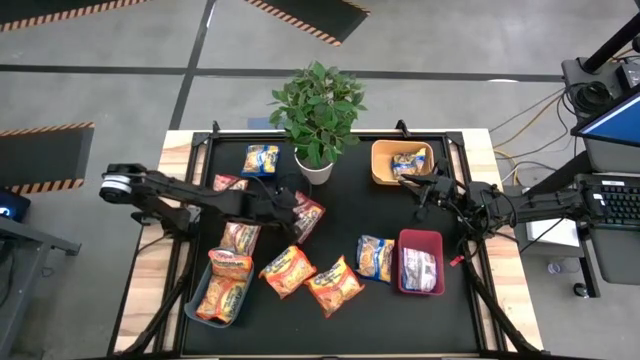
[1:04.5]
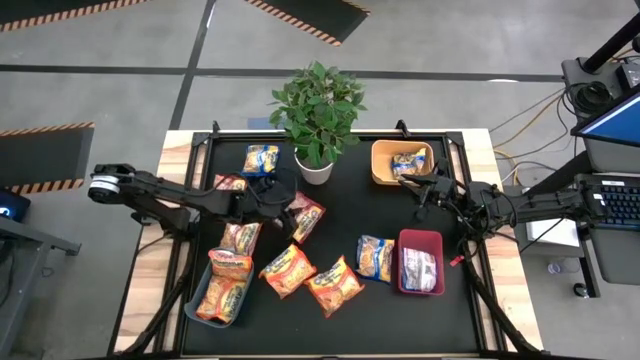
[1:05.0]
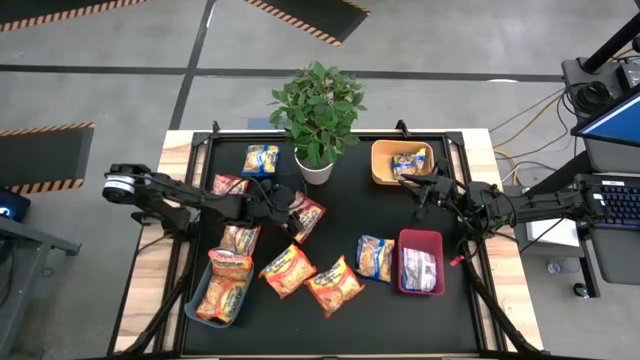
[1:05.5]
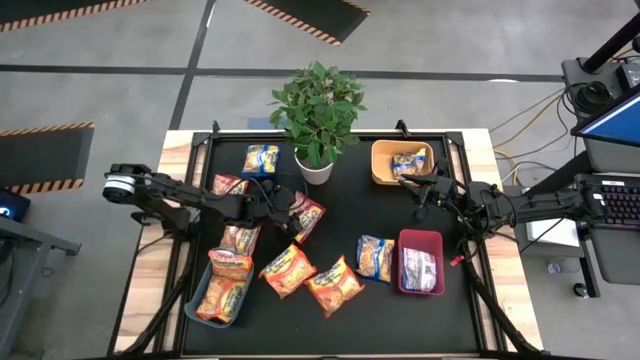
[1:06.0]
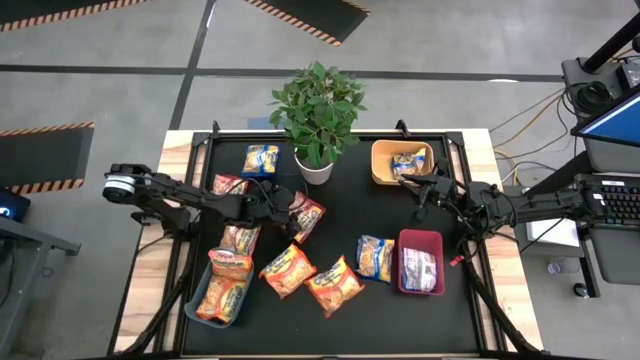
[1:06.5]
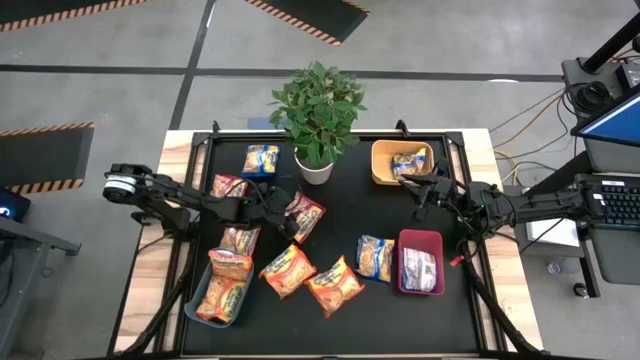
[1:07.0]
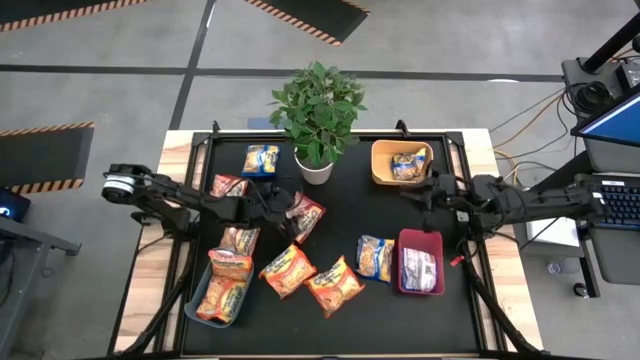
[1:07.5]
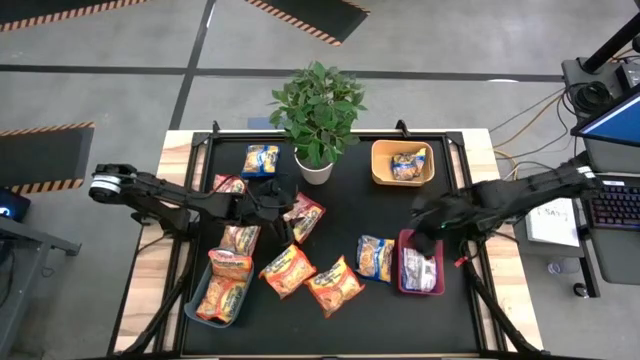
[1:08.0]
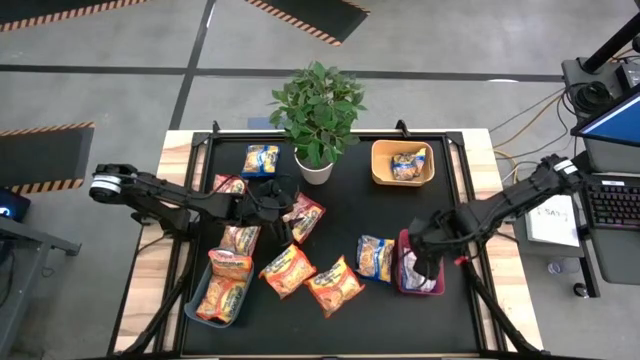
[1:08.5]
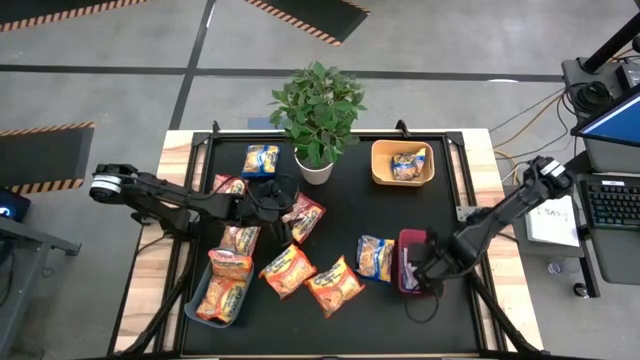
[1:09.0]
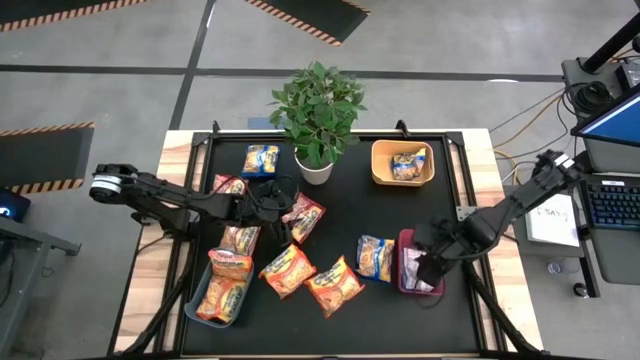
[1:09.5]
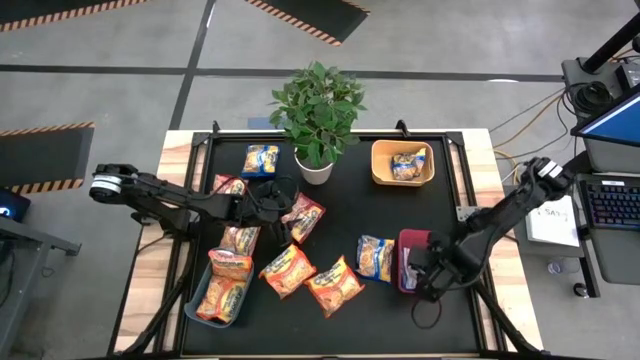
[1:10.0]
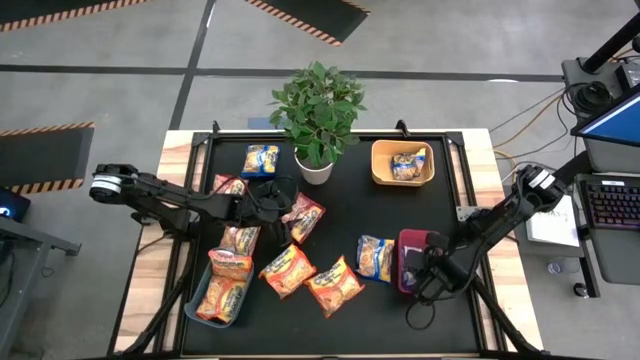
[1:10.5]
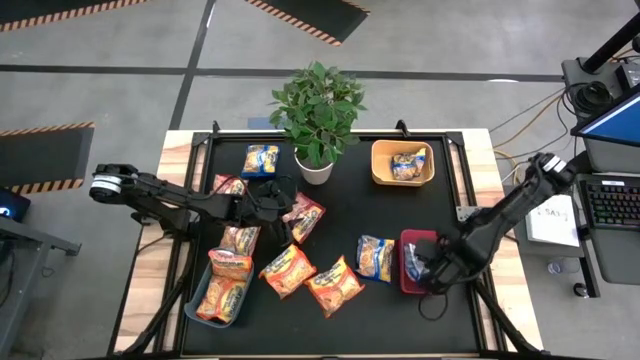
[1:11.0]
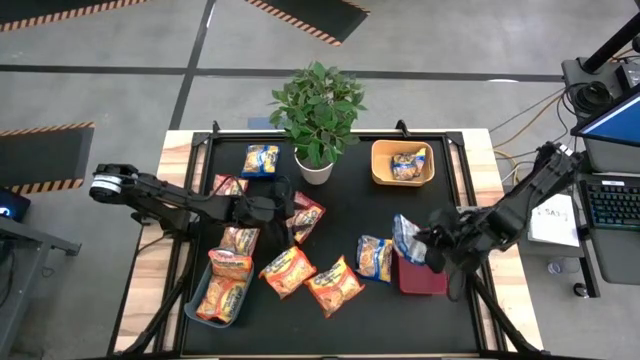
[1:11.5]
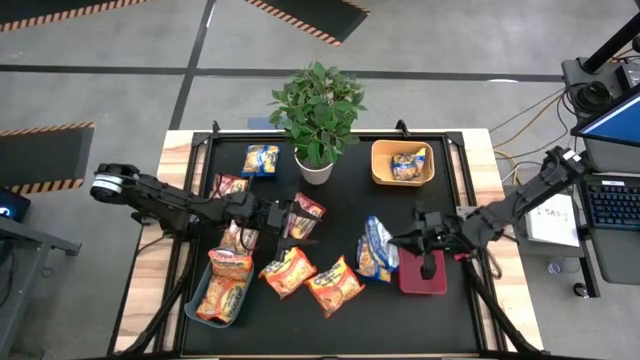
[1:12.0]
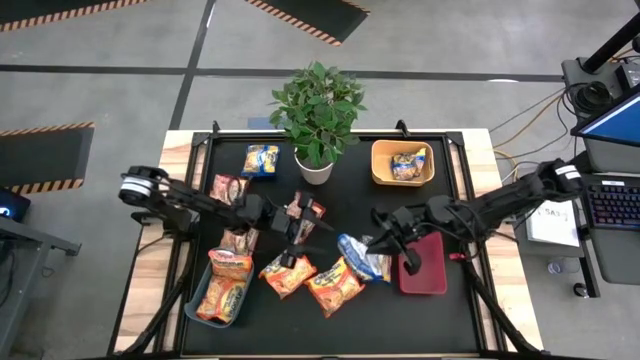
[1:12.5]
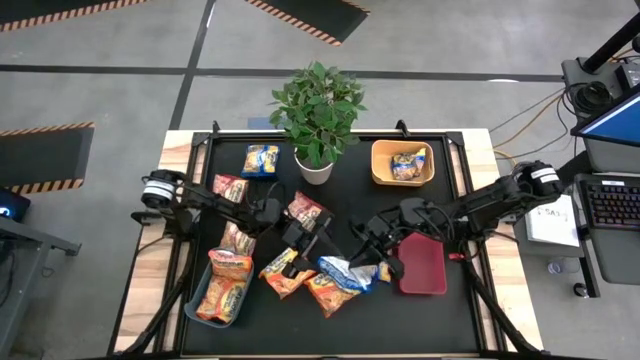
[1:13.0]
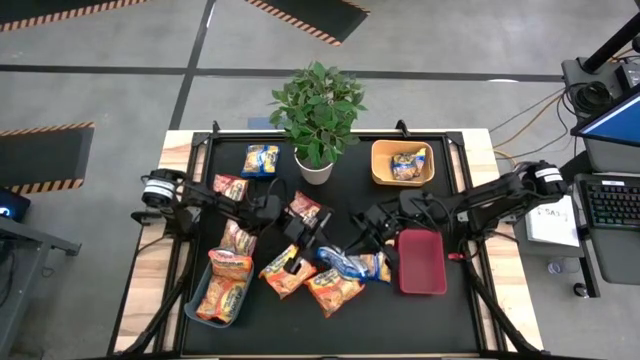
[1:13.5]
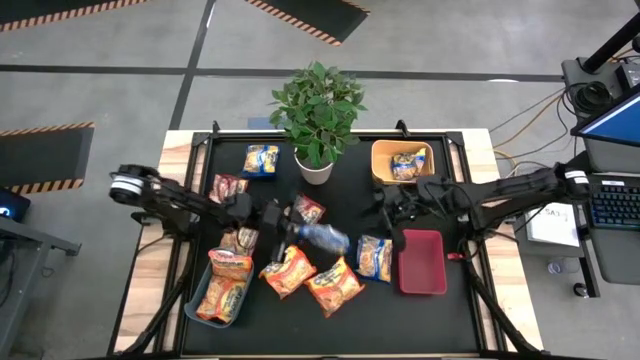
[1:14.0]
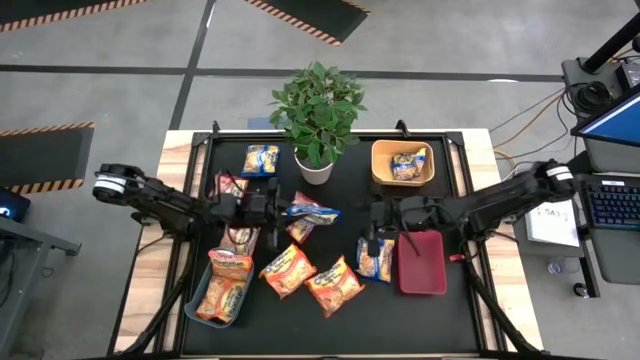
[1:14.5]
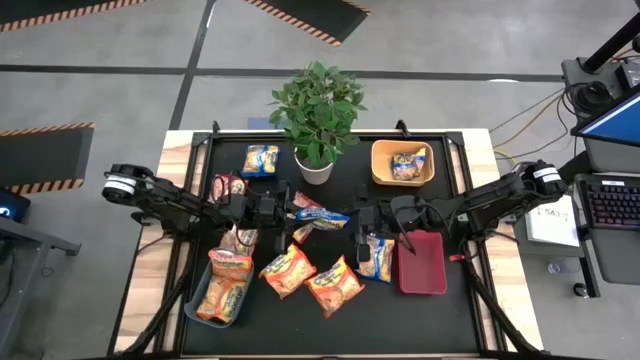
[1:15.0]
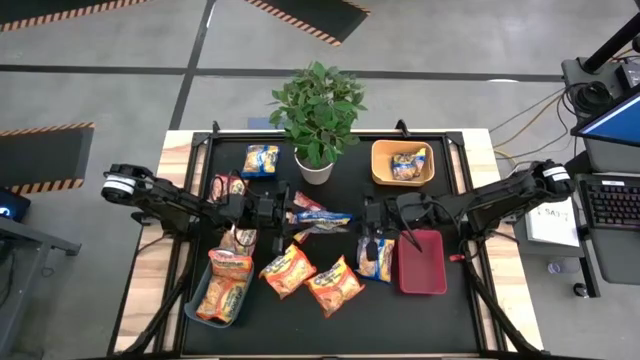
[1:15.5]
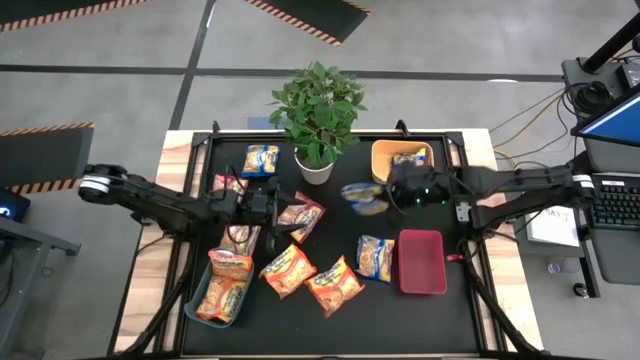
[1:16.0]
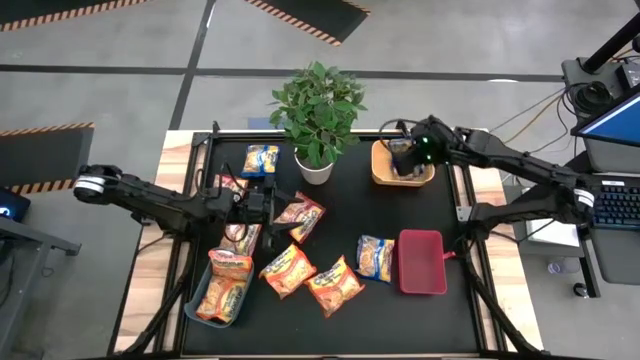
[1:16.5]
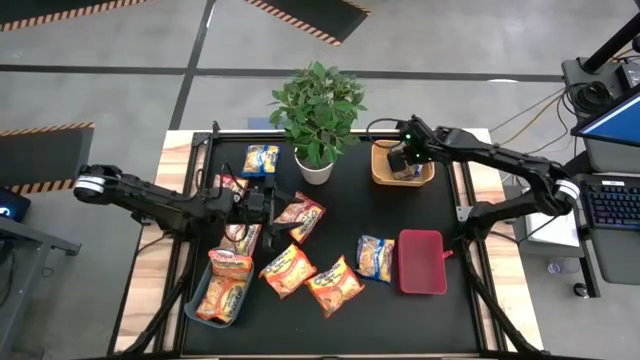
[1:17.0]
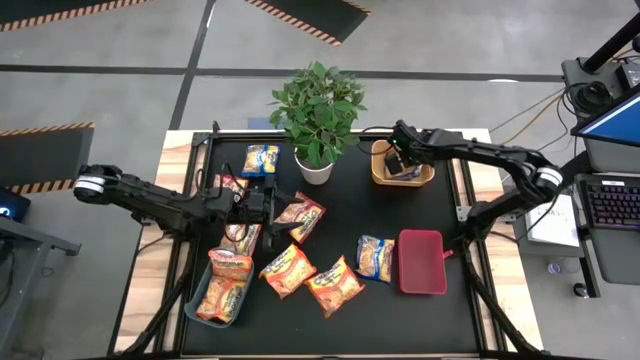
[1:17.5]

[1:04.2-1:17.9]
Task: Sort Maruchan noodles
Put the blue noodle pack into the yellow bin

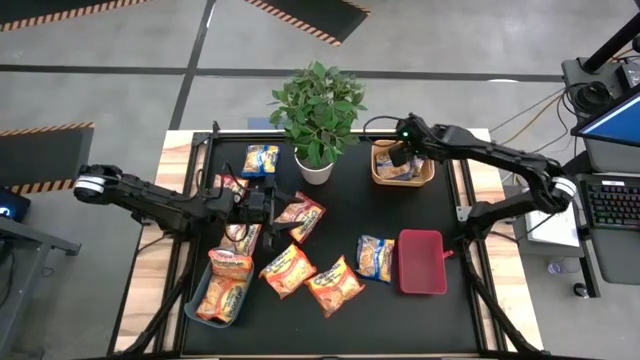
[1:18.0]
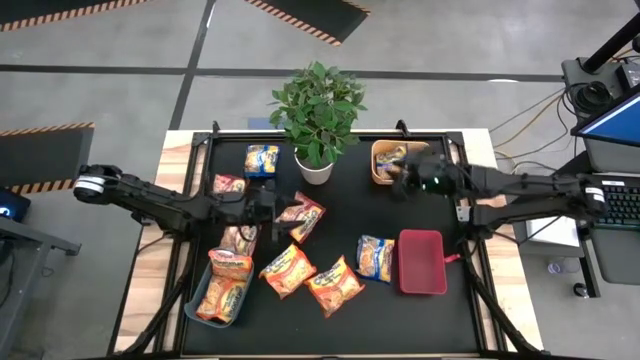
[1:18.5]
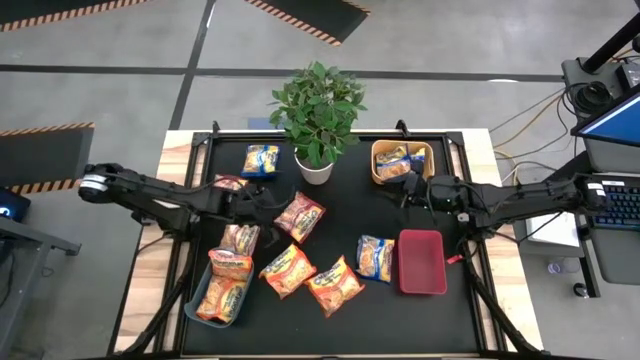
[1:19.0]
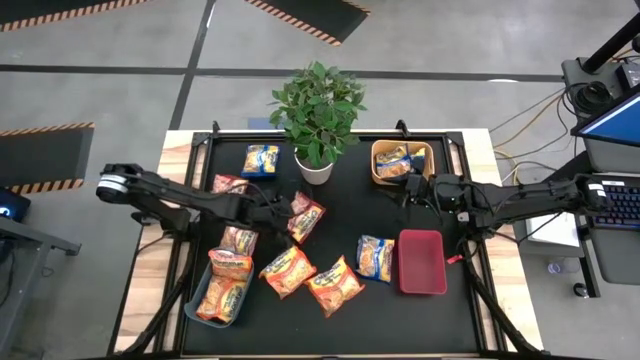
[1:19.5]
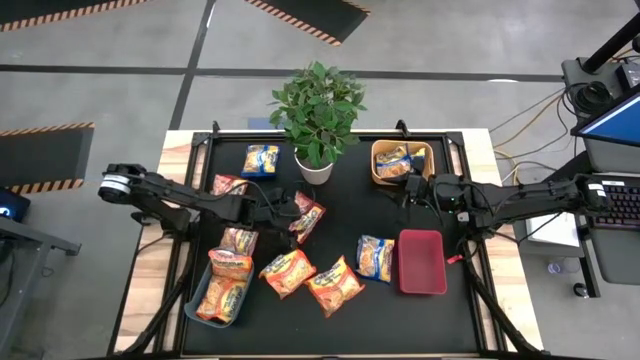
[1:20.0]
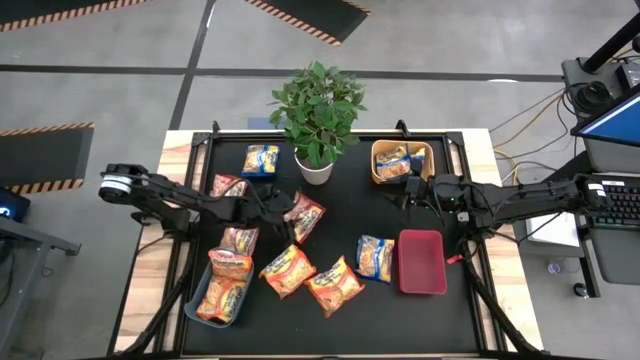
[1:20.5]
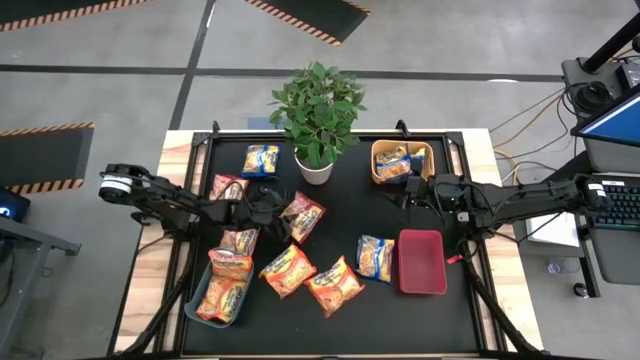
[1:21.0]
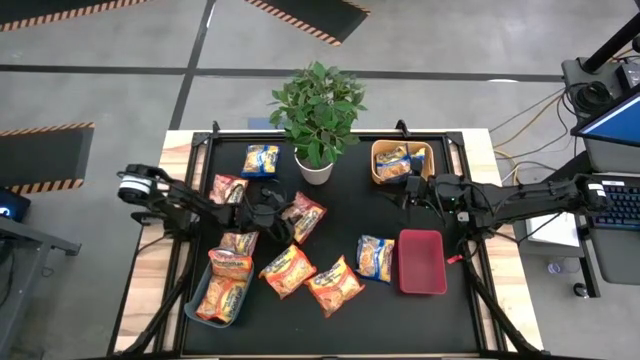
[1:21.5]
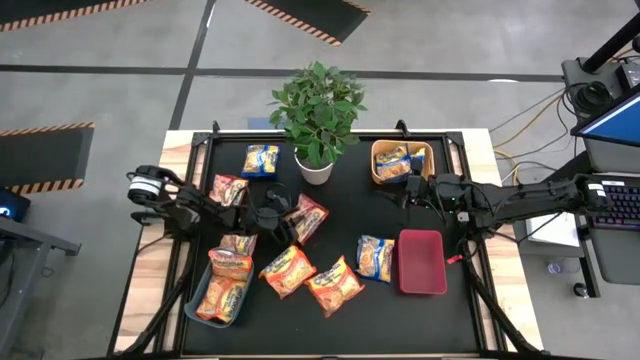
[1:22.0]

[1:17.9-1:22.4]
Put the red noodle pack into the pink bin

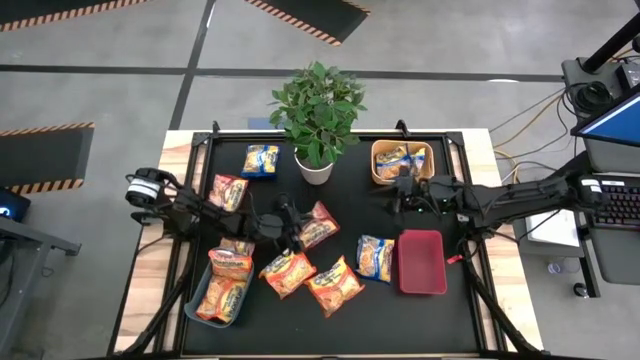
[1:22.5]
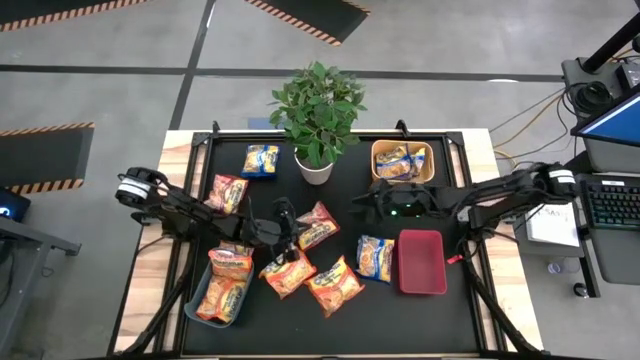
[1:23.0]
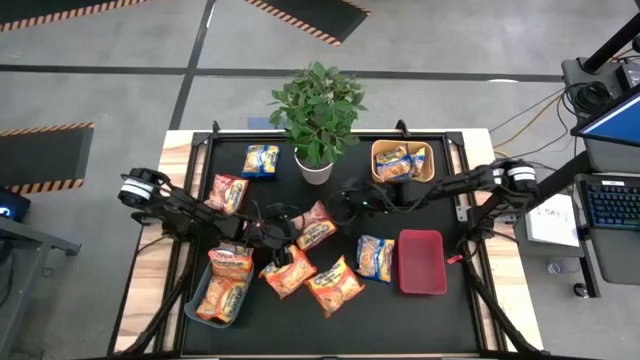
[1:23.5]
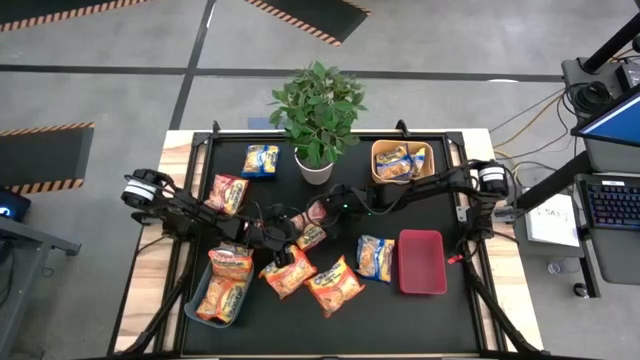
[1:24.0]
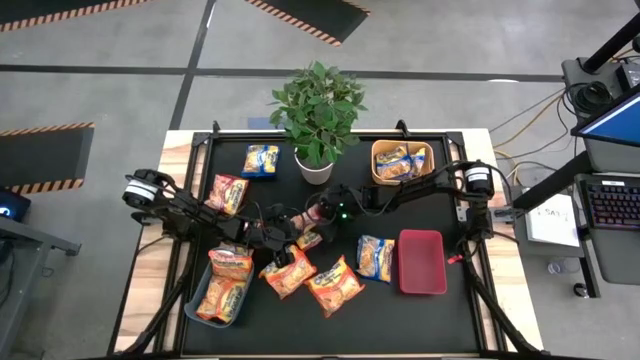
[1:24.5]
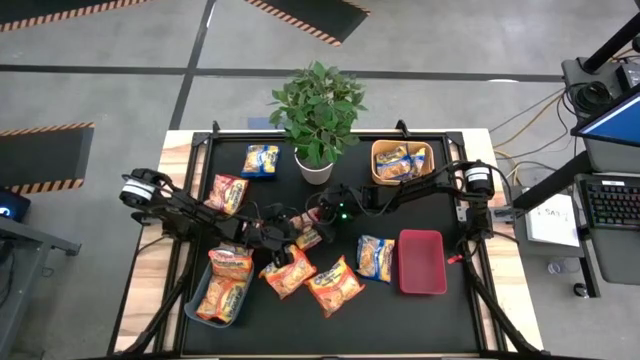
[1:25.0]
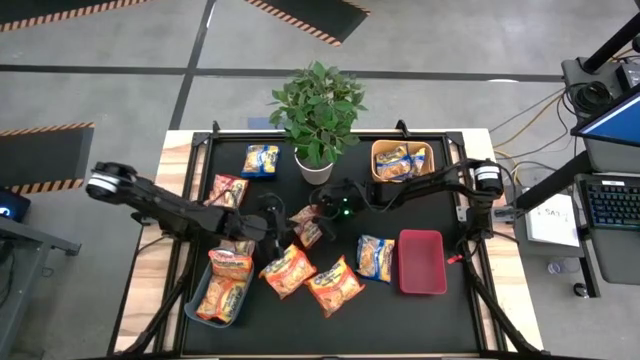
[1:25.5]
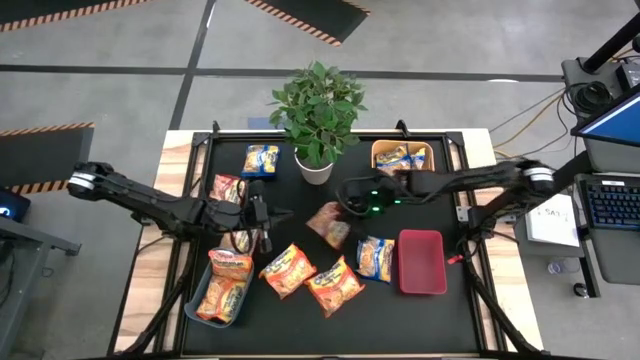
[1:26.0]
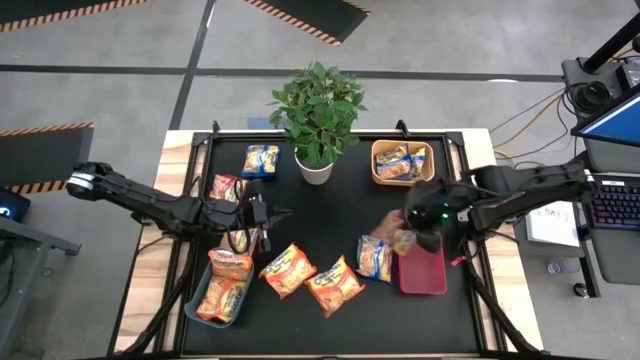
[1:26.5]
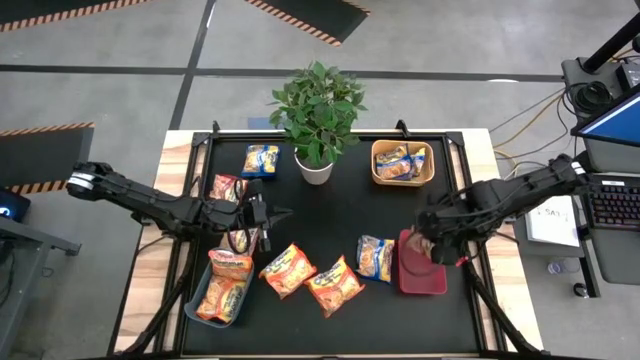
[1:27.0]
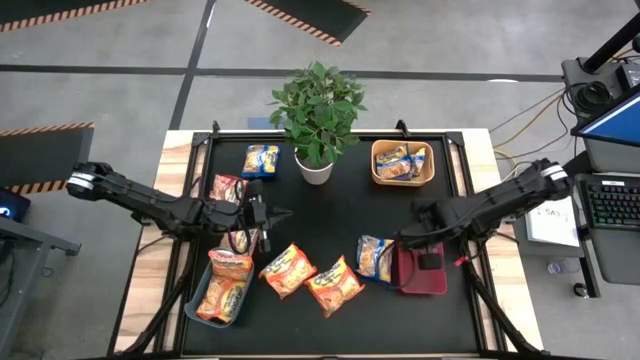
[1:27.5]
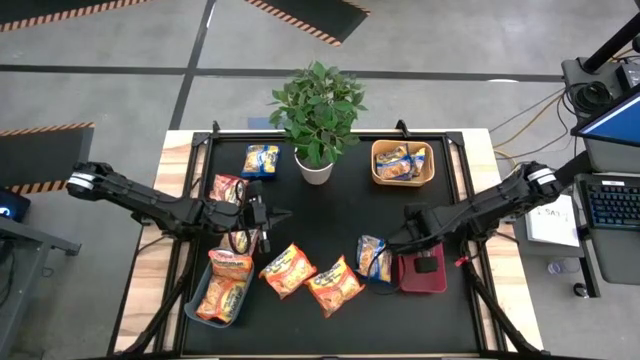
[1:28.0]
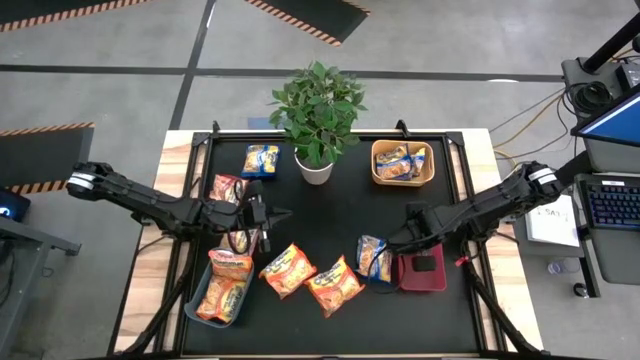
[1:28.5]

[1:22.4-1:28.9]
Put the red noodle pack into the pink bin
